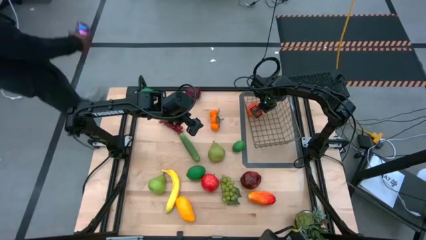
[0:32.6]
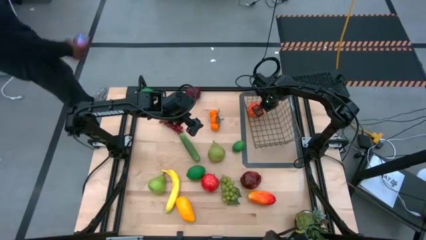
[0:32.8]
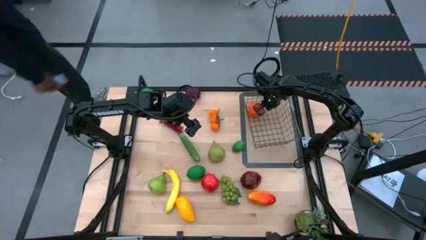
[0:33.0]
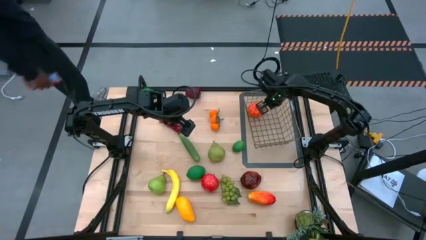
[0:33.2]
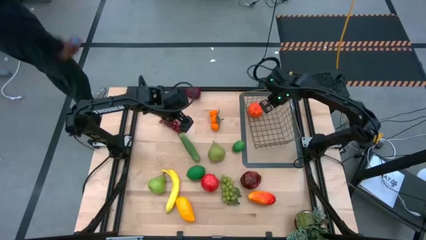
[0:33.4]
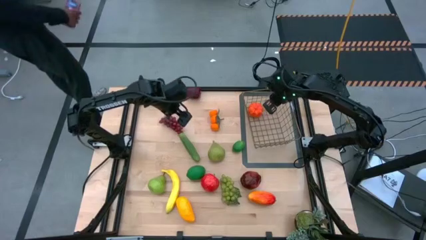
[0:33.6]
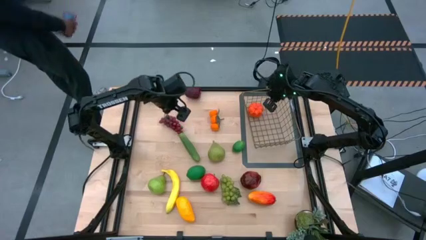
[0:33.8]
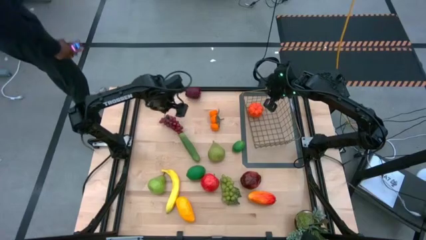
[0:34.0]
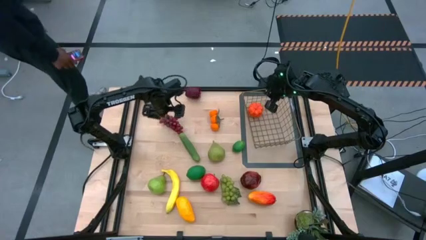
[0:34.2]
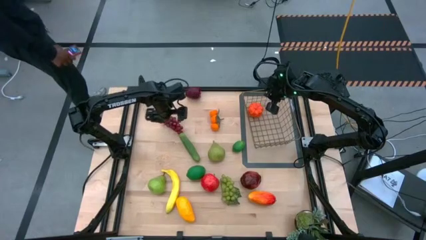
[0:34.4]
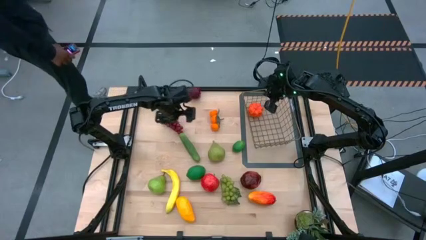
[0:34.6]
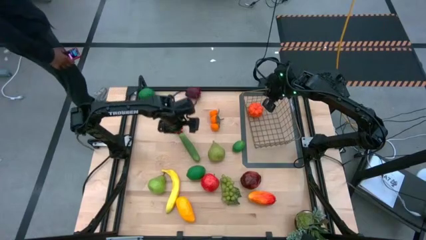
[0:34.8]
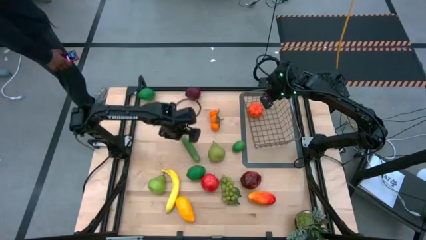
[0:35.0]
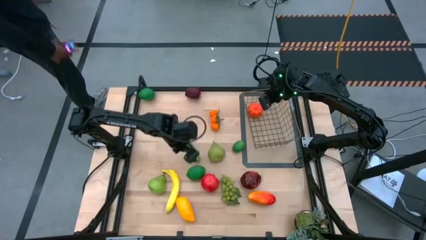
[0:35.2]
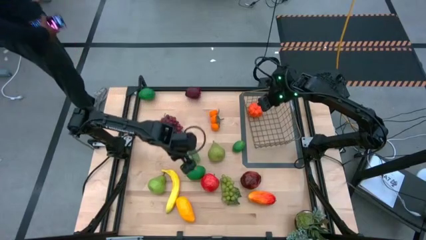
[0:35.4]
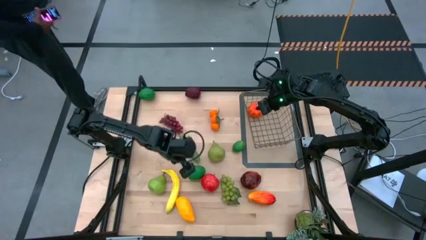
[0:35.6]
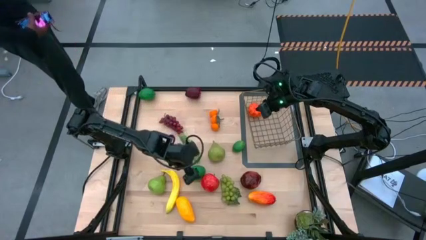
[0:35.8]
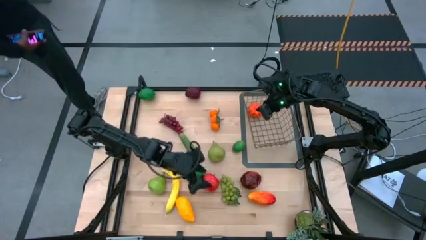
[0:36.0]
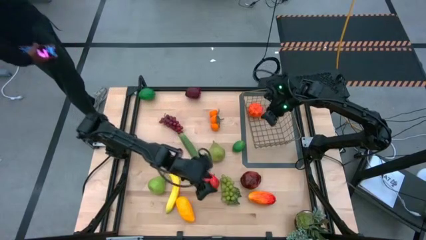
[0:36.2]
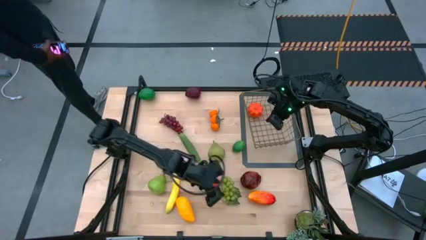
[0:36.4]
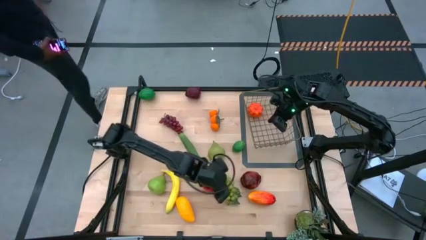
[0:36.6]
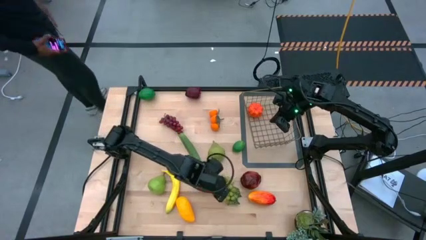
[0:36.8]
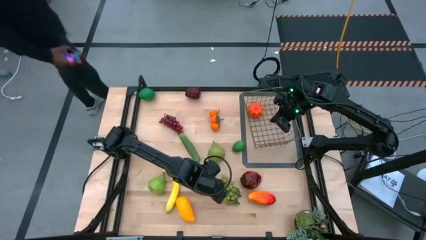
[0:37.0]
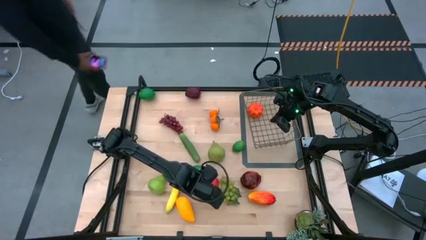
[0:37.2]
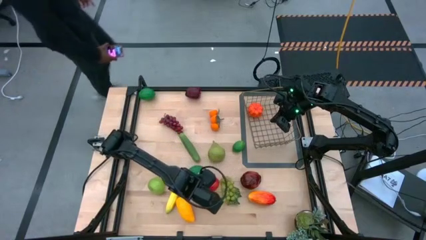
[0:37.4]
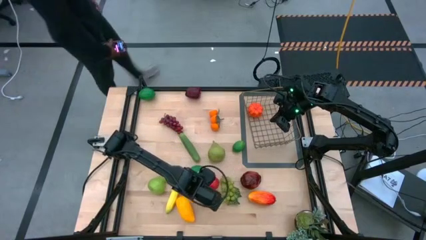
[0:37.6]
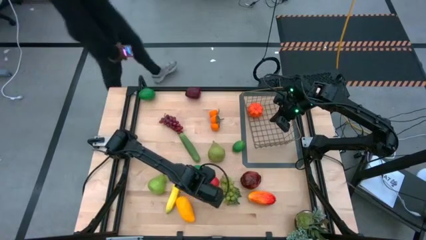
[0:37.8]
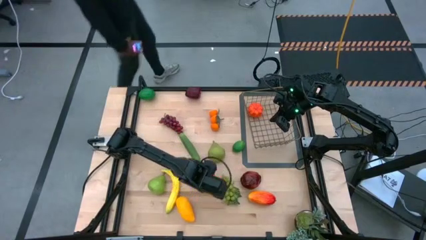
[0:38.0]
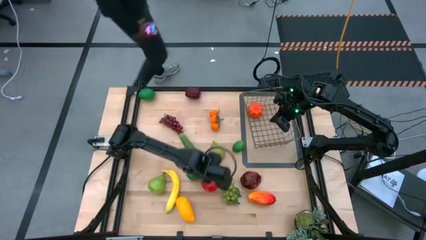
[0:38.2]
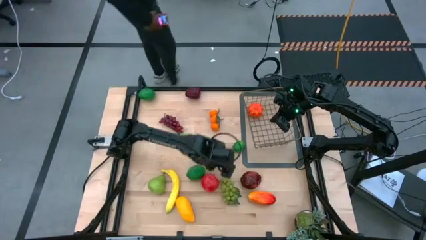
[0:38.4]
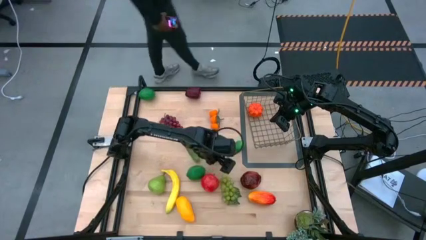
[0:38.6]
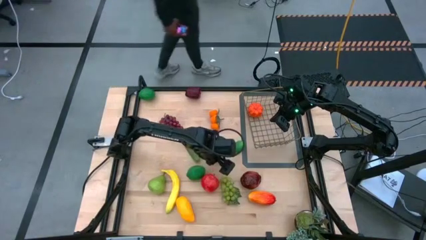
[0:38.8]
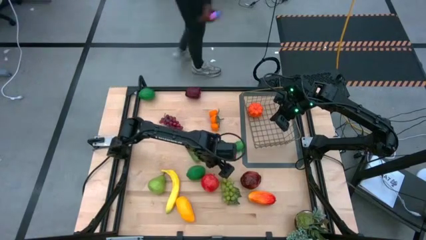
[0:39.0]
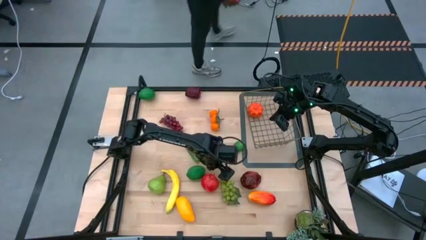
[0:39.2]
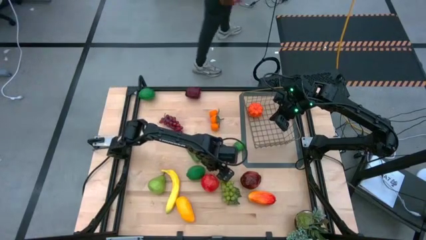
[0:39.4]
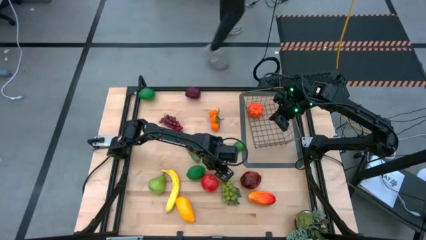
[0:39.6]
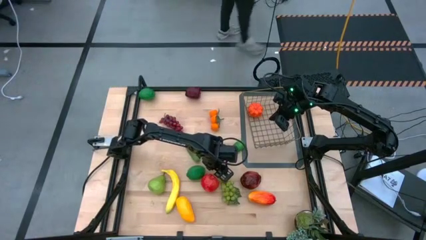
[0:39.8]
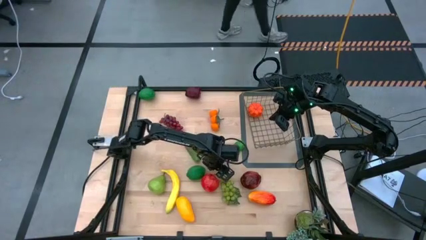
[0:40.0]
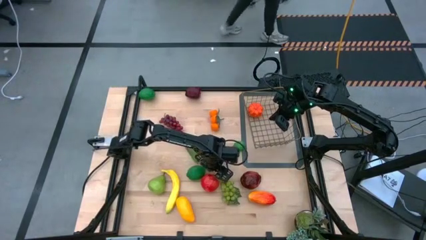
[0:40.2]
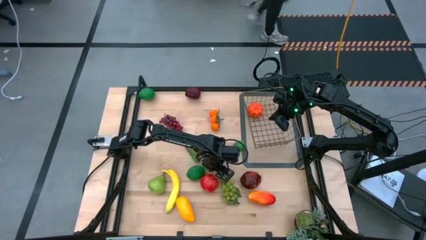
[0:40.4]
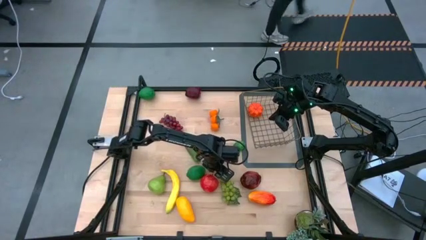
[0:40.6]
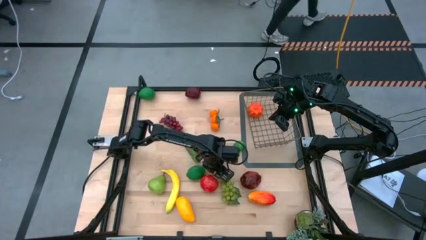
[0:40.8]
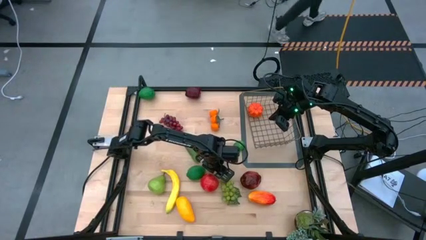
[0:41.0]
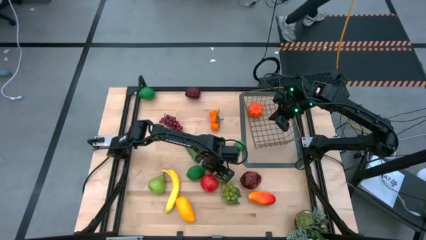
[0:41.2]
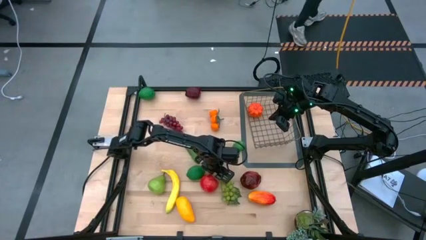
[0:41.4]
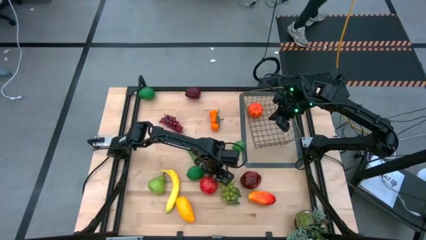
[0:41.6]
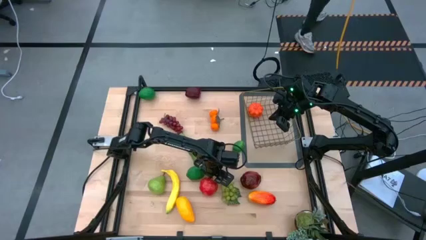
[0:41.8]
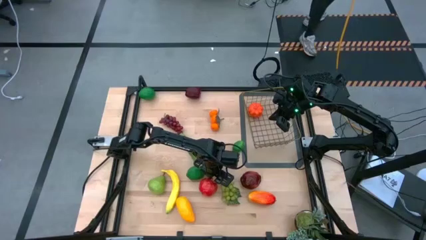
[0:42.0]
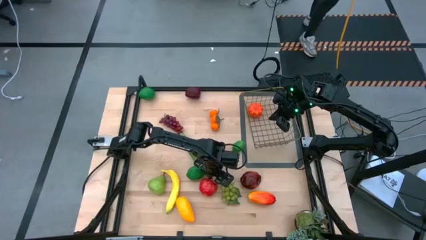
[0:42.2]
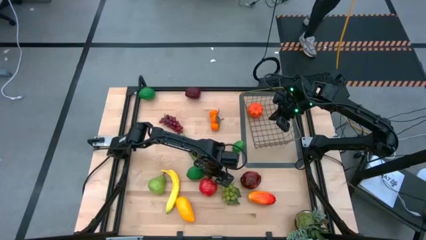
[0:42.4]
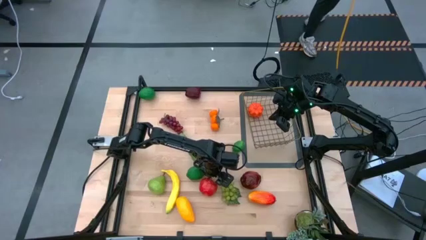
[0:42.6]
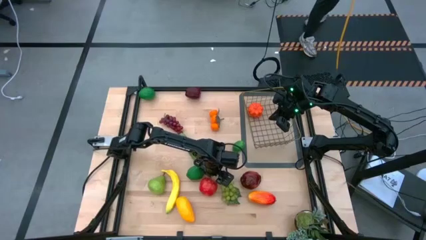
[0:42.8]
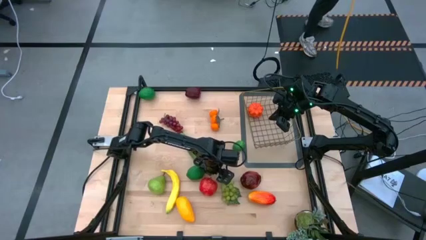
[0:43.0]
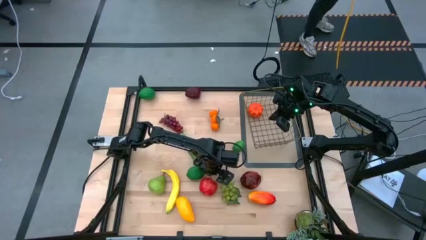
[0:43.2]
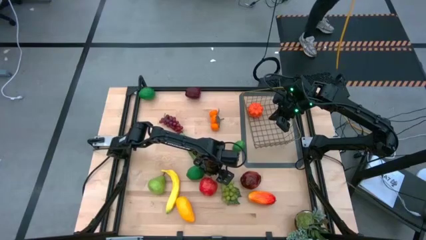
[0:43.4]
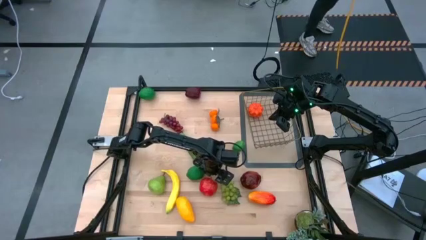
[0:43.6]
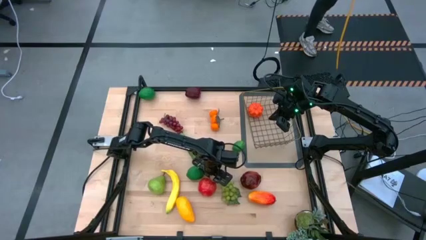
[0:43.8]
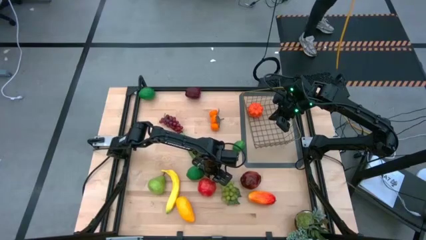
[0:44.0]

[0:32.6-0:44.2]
Task: Build produce basket
Put the light red apple into the wire basket

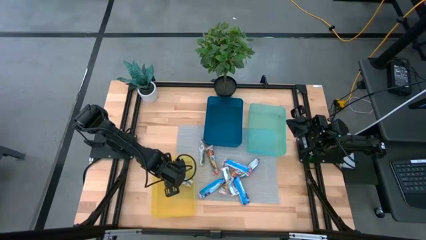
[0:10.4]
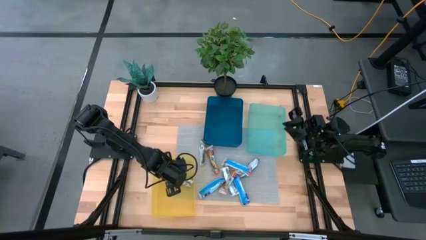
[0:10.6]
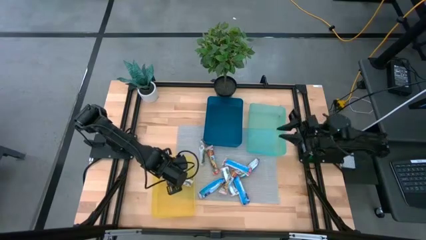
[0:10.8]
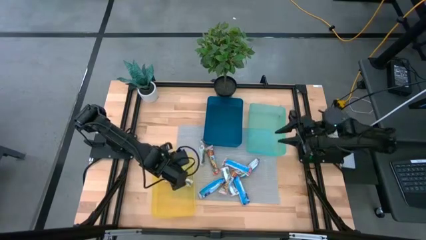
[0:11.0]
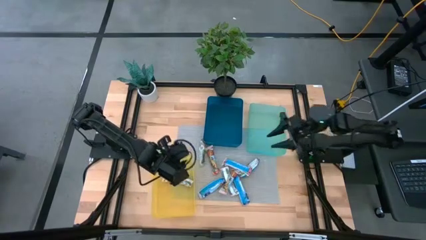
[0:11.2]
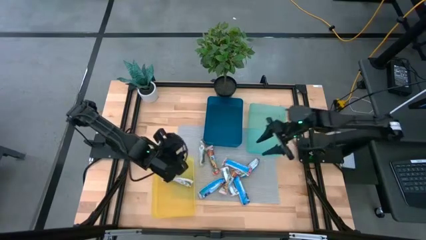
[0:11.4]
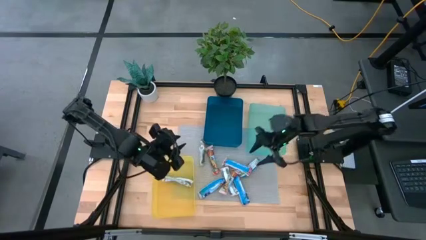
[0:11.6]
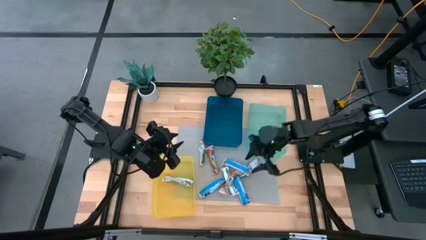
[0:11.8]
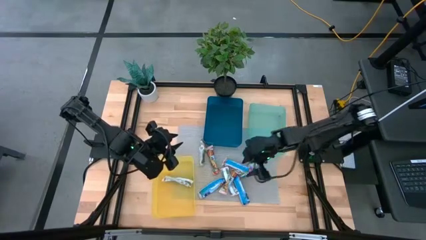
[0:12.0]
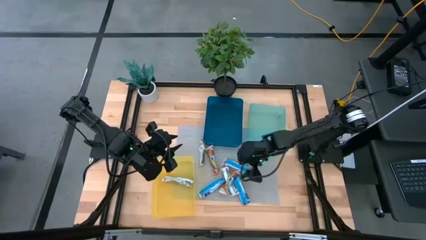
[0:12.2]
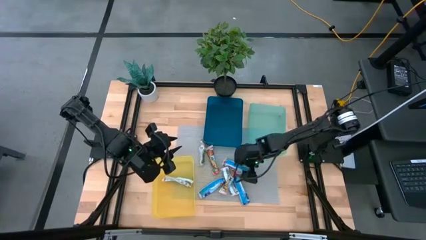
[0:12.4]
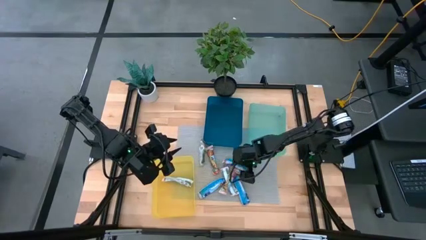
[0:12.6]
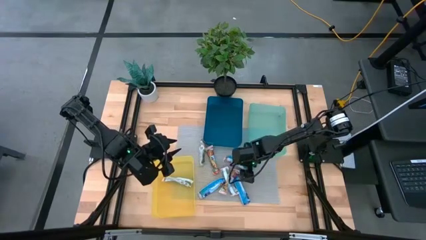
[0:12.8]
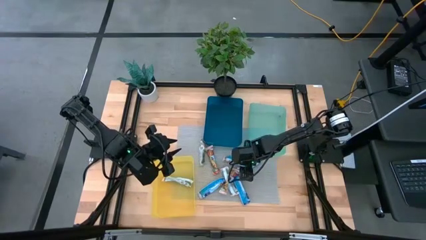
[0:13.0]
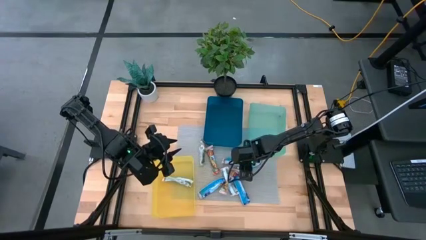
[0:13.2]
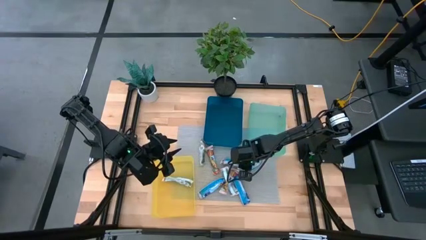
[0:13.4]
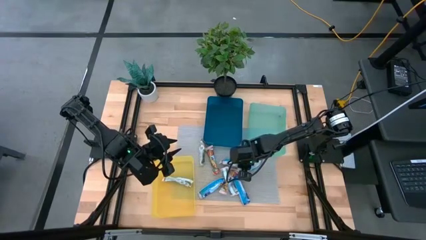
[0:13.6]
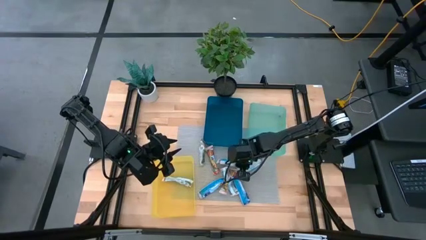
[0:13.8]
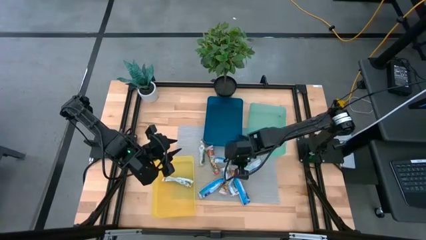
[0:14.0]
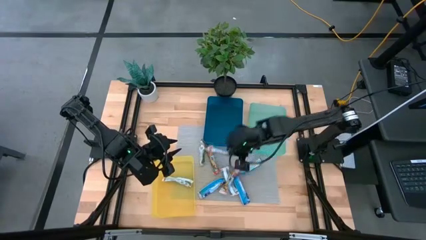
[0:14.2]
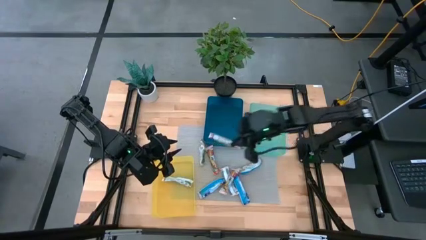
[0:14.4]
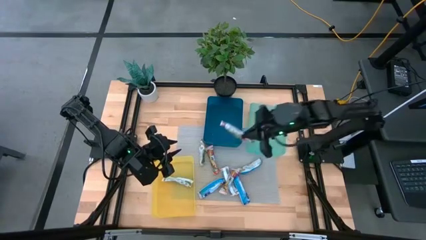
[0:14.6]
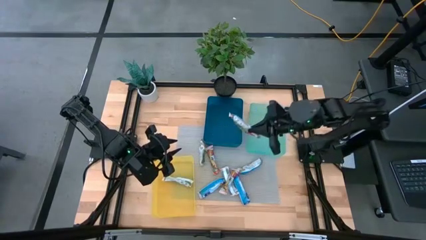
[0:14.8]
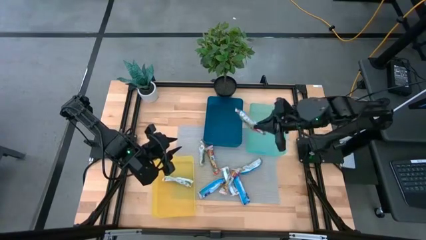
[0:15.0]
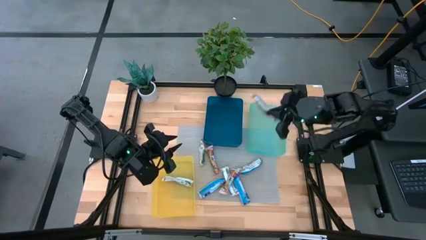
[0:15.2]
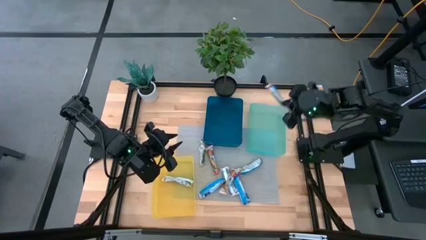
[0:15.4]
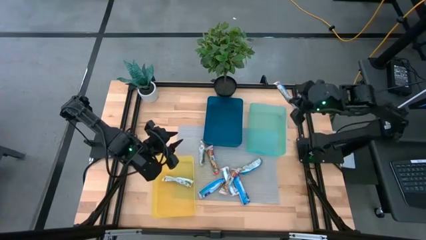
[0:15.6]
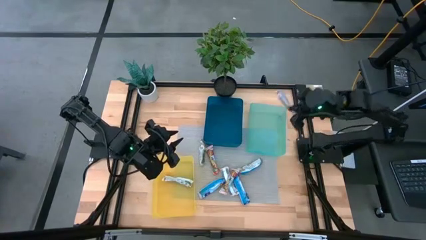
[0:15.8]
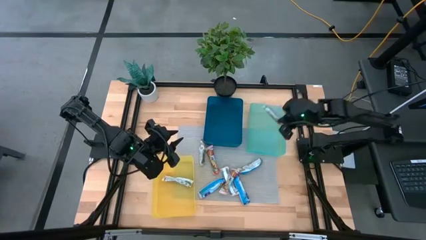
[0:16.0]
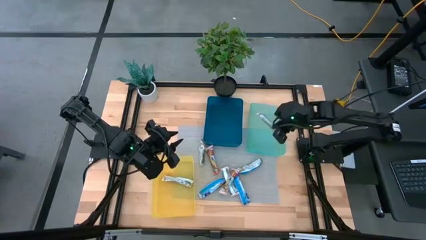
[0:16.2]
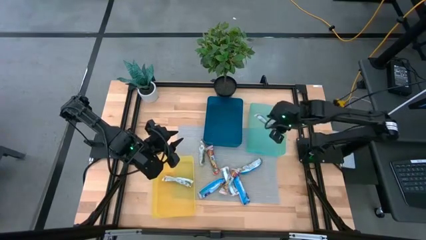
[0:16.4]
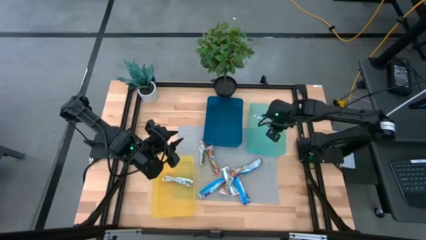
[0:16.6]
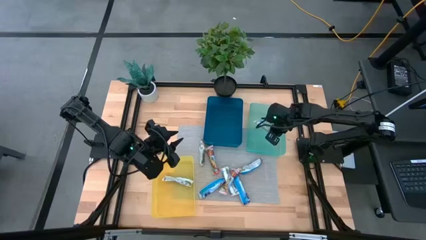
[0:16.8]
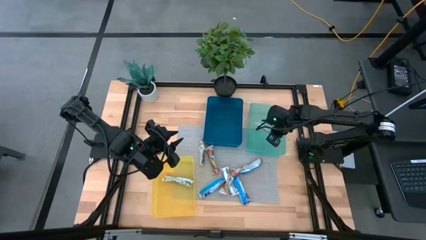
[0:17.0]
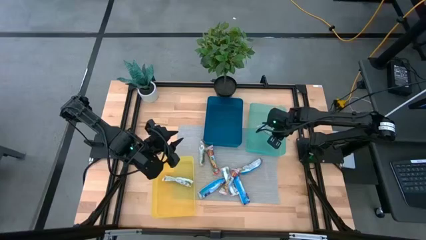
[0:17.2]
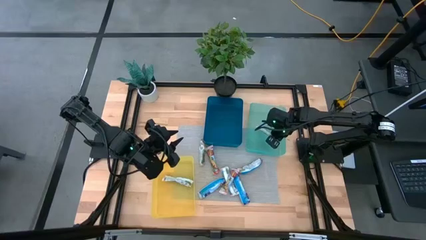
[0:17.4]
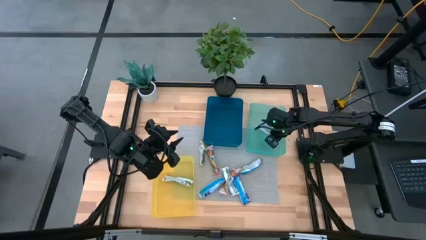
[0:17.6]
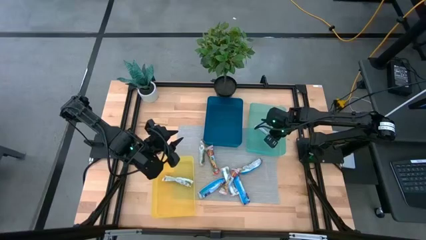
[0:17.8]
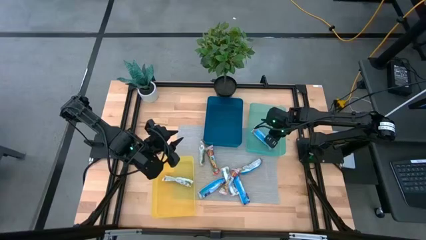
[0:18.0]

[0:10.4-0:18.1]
Task: Pick and place Granola Bars by type
Put the red granola bar into the green bin
